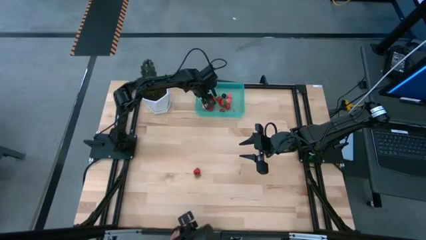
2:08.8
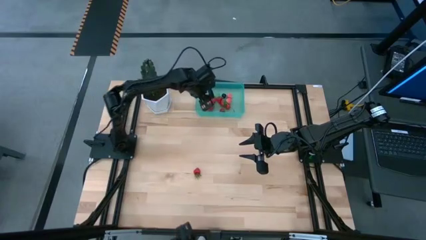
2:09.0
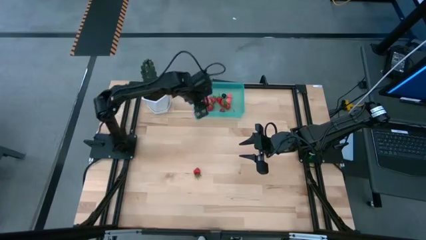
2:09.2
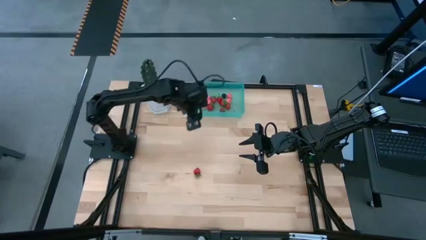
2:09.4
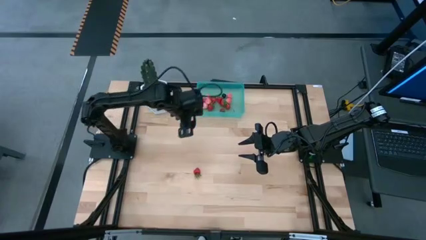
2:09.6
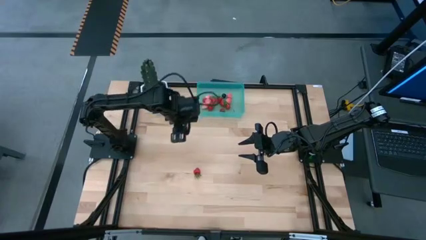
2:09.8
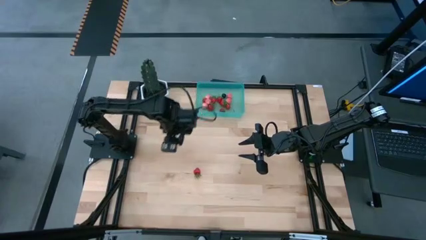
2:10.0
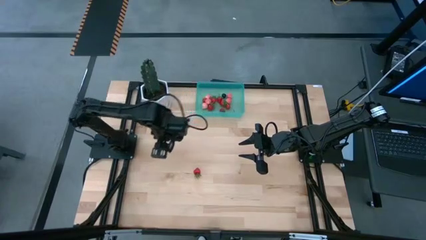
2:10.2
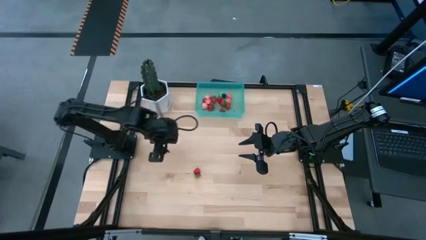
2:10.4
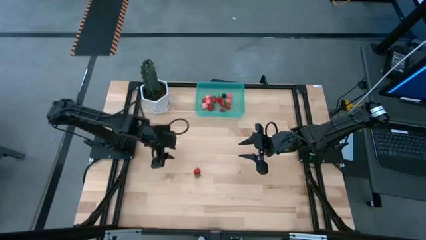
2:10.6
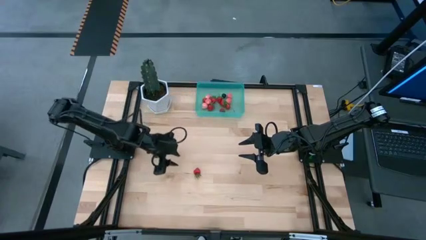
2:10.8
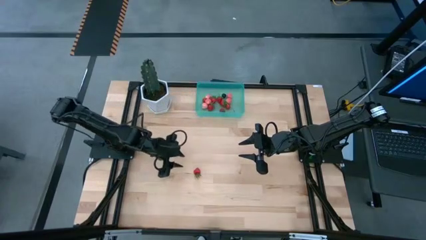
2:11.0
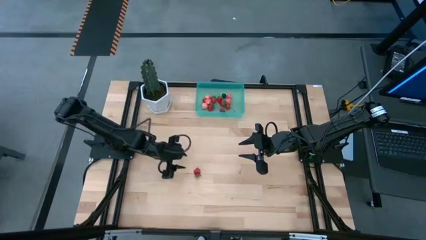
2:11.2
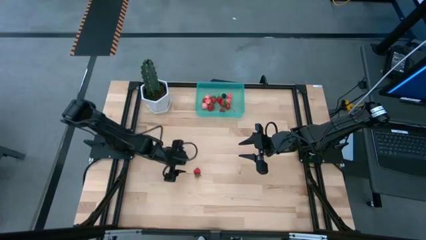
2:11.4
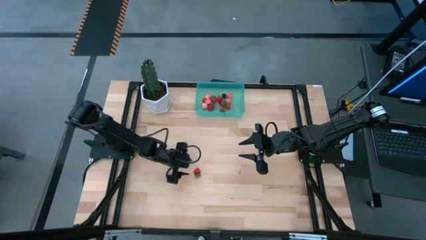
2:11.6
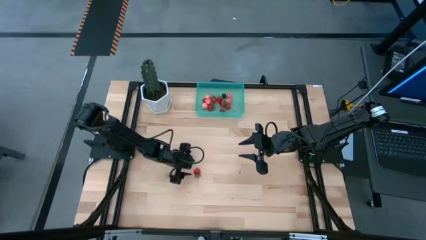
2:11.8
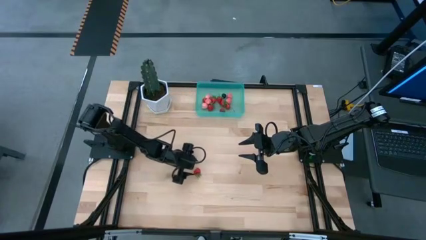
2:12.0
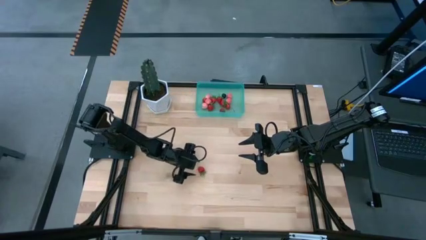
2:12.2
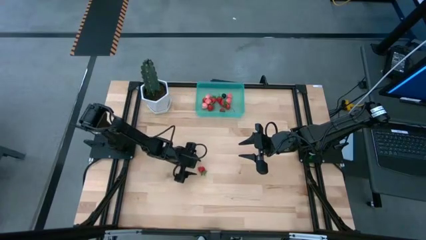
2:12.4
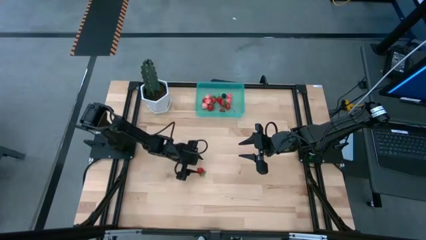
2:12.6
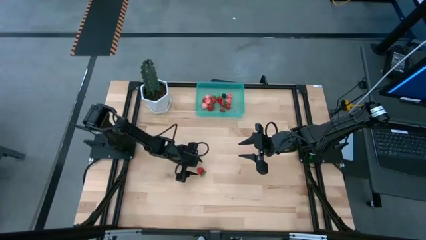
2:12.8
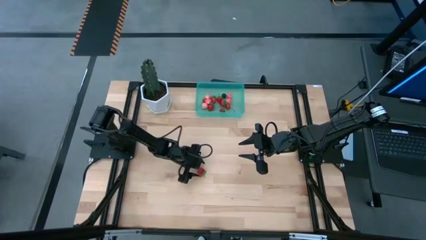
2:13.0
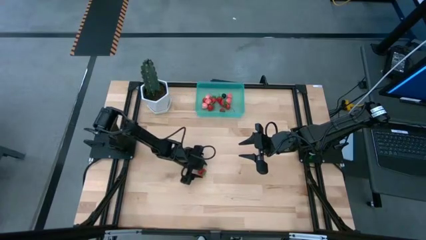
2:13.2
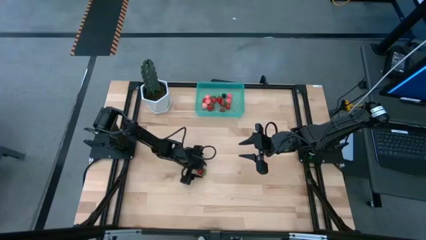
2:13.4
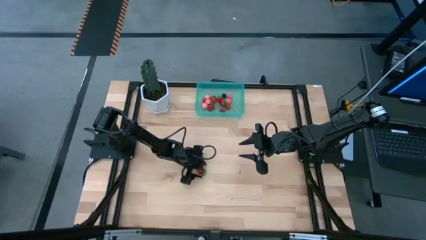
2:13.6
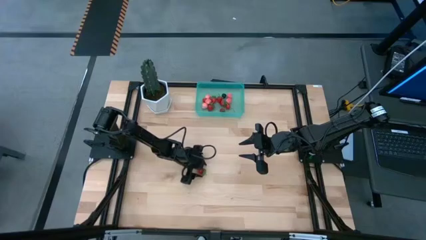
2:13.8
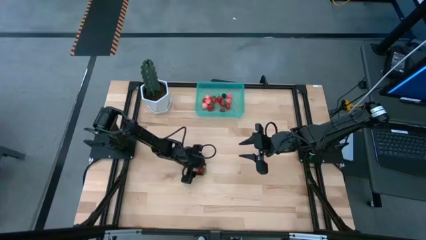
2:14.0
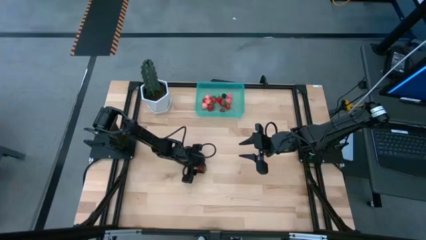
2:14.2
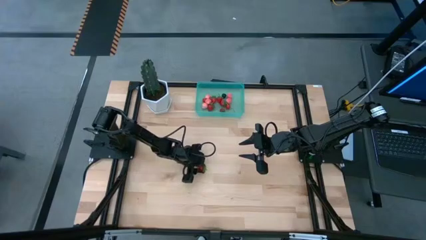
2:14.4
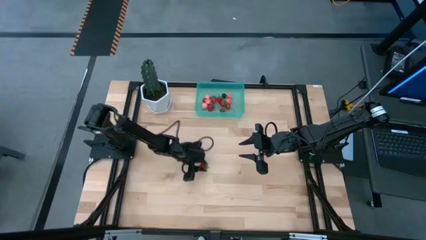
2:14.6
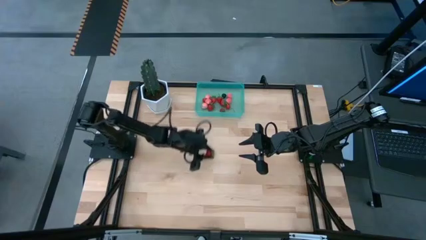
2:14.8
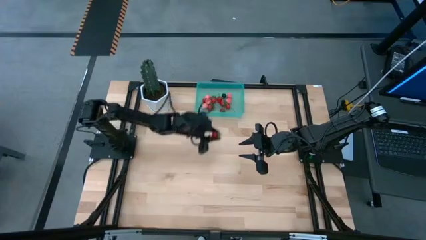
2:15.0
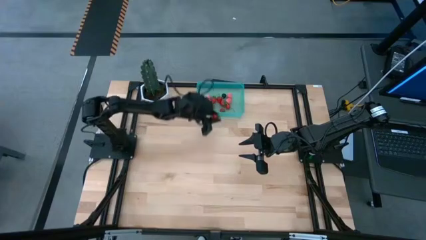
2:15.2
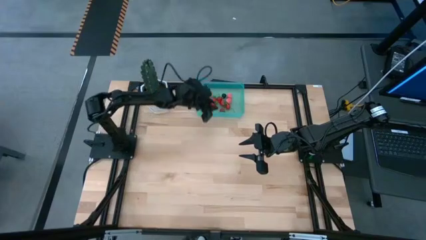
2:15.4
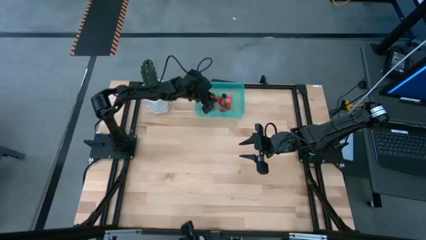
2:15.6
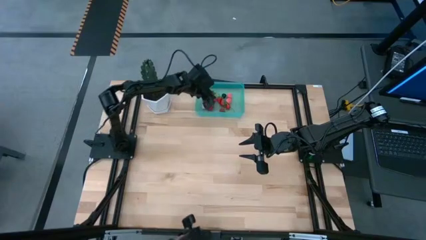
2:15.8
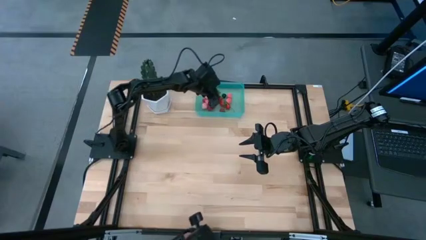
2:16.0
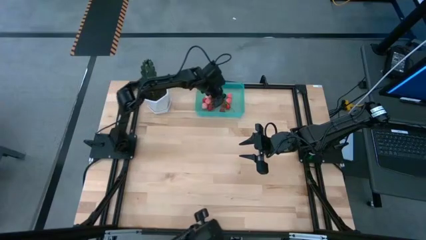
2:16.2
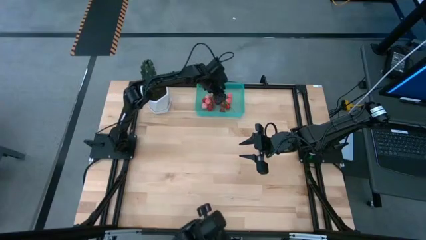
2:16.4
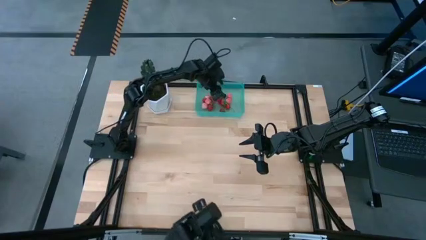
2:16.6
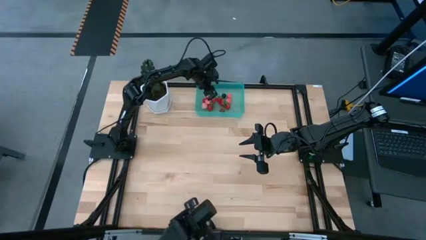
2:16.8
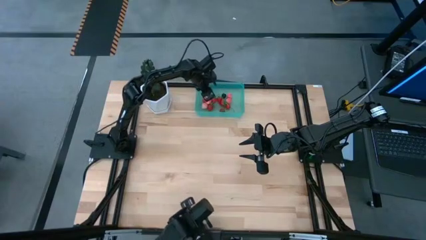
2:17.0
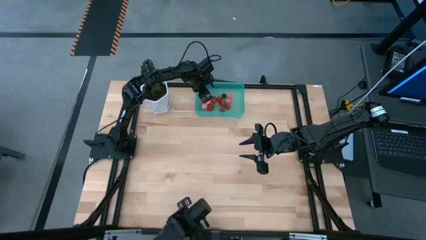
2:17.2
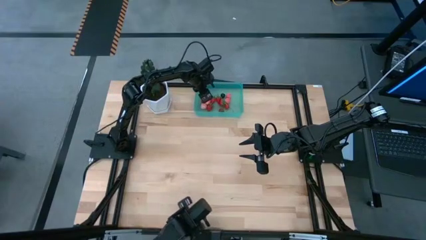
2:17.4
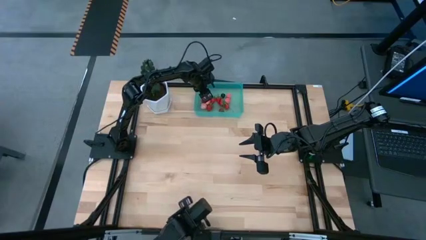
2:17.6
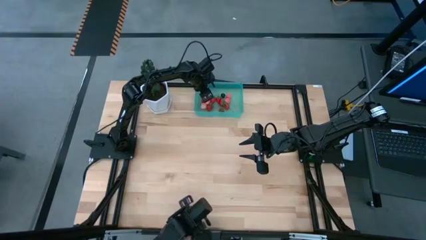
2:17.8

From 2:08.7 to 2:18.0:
Task: Pick and placing Produce into tupperware
Put the strawberry into the container

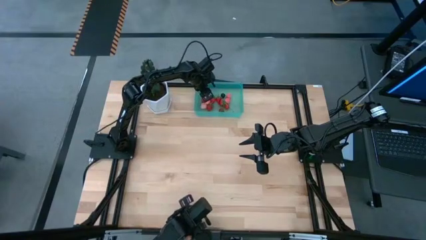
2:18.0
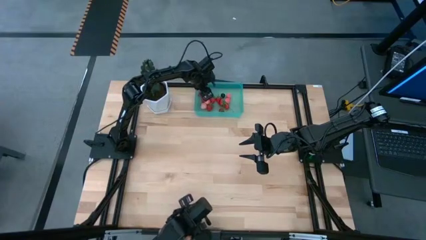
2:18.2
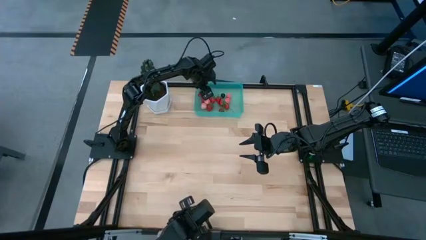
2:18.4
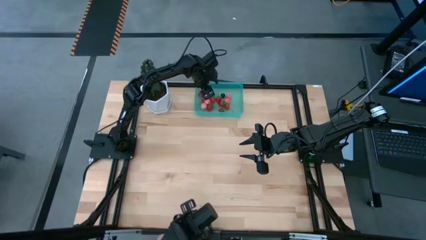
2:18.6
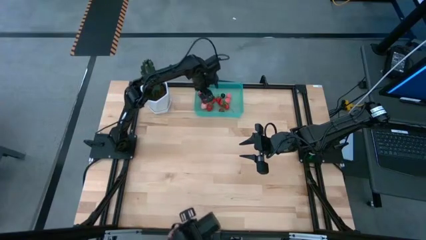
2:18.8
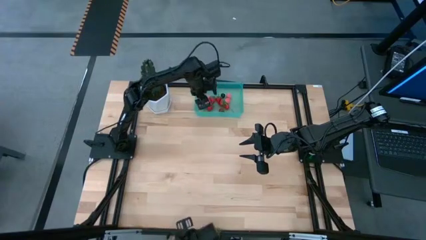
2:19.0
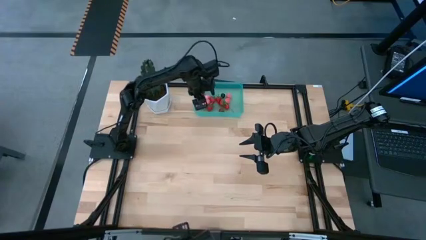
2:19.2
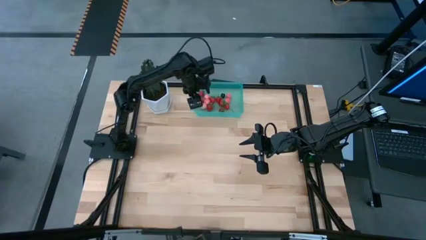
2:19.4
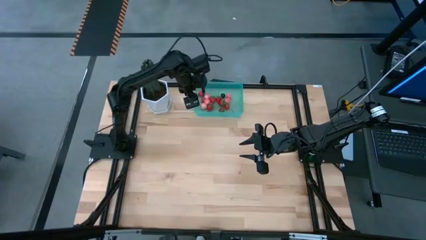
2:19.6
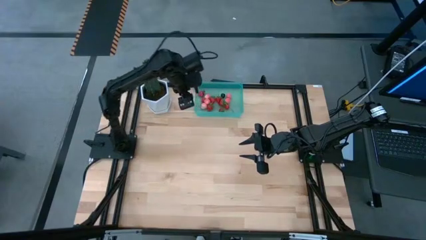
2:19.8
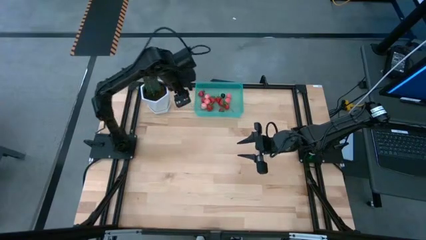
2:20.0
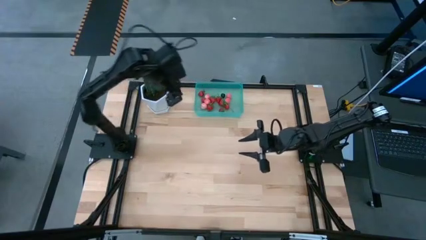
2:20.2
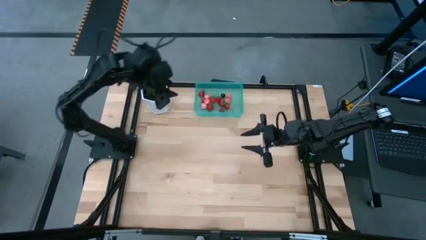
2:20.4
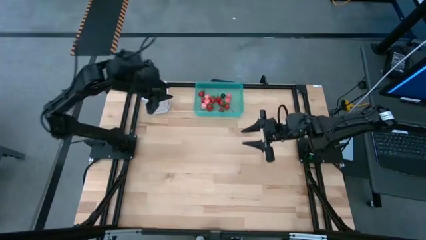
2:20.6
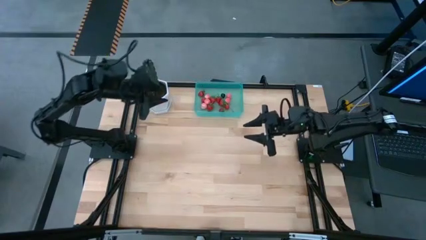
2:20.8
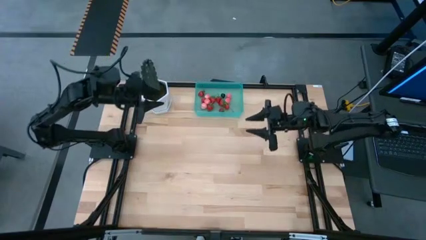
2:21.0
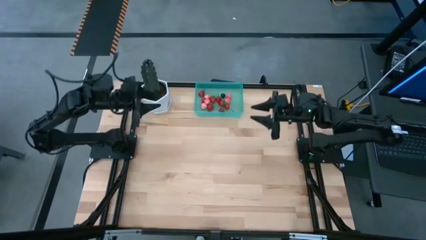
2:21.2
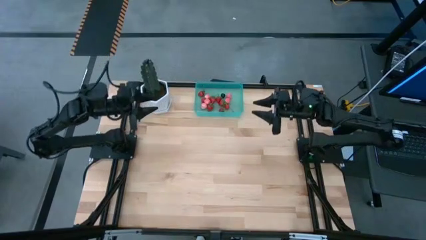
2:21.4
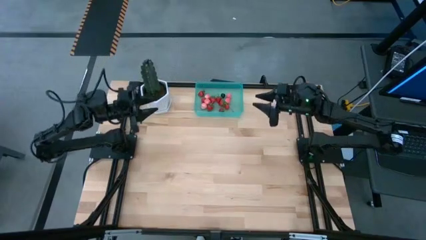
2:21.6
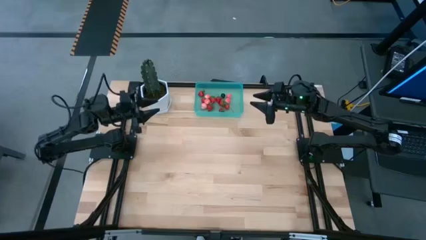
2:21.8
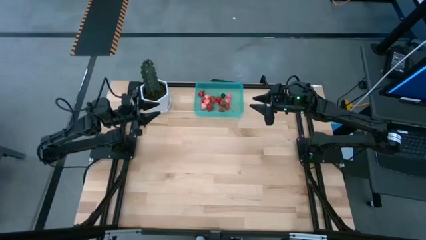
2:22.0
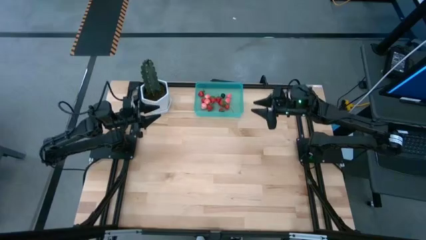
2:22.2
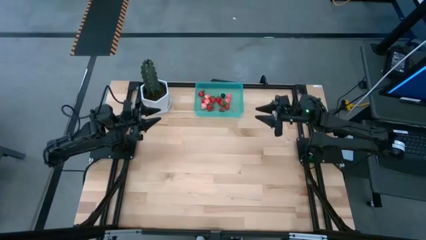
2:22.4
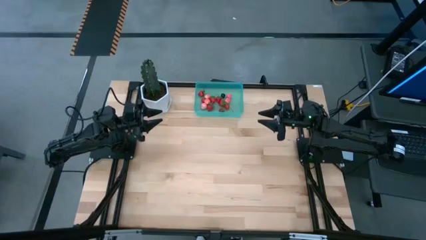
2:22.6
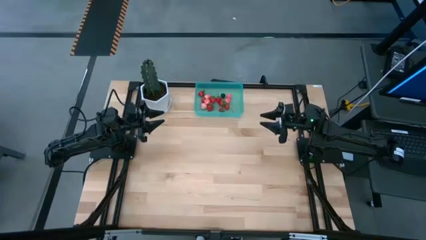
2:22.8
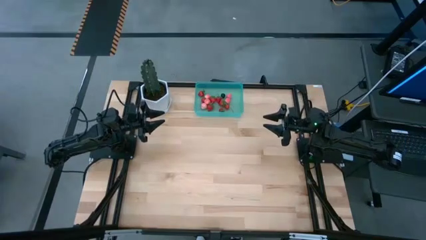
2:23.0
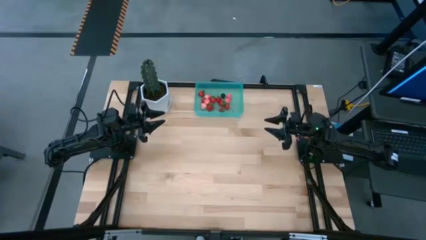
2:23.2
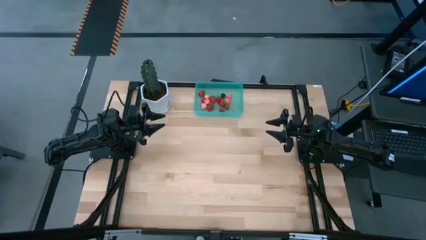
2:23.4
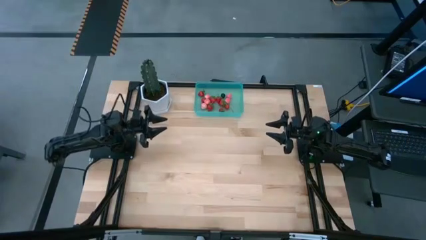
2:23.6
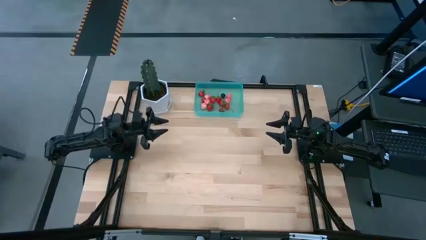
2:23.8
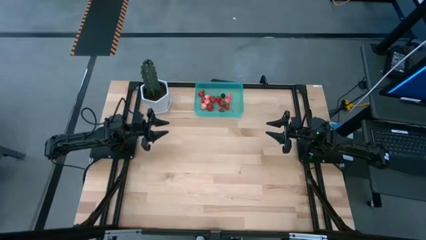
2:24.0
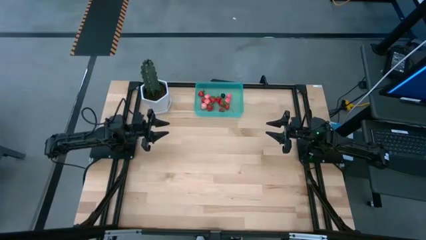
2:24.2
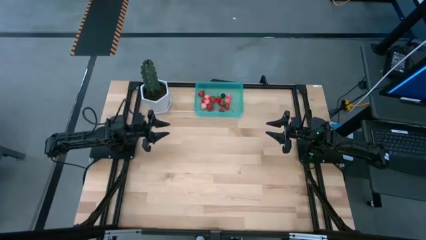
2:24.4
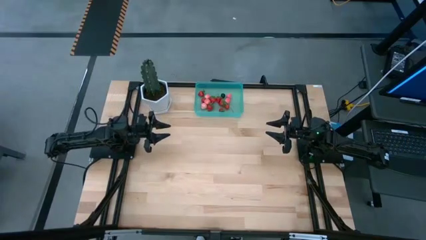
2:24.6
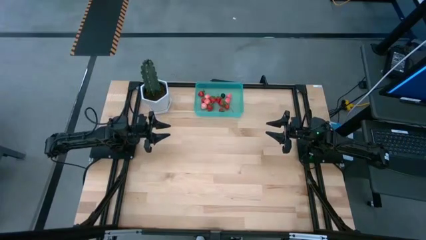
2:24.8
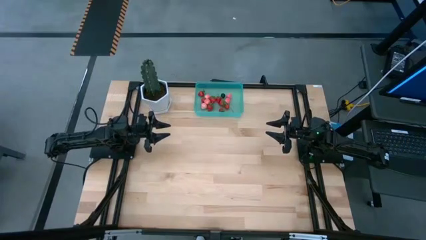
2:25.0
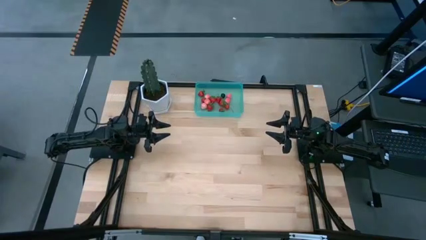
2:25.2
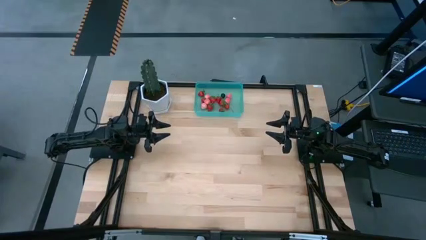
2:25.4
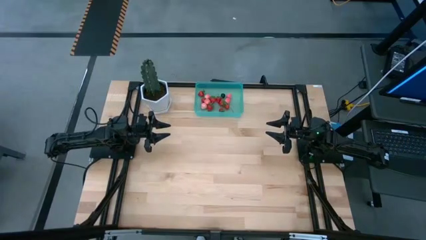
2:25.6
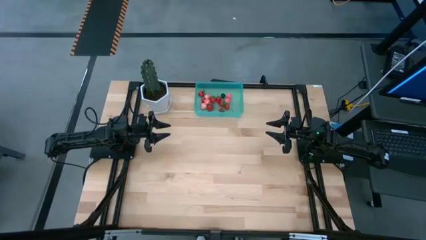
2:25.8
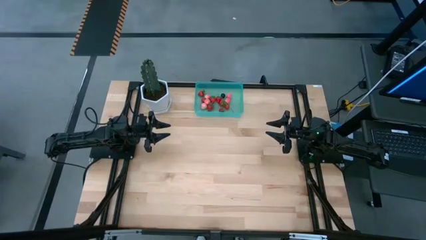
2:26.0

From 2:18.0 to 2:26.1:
Return to Home Position
